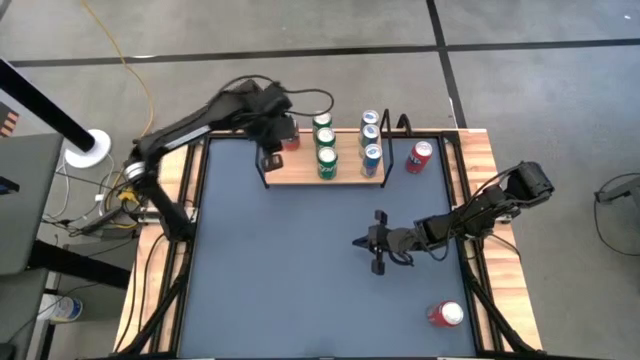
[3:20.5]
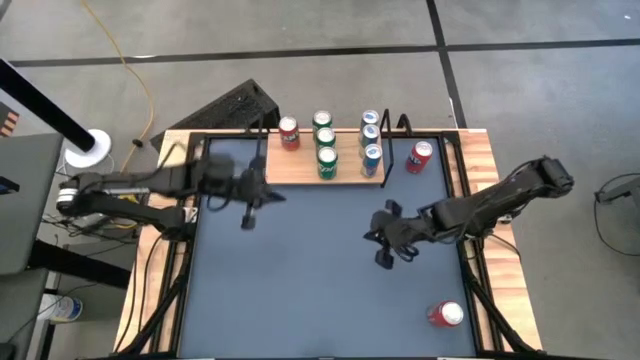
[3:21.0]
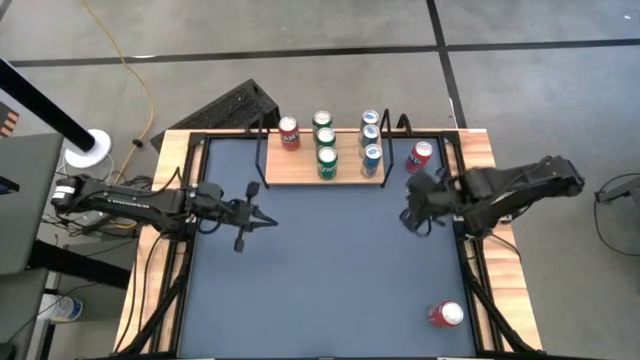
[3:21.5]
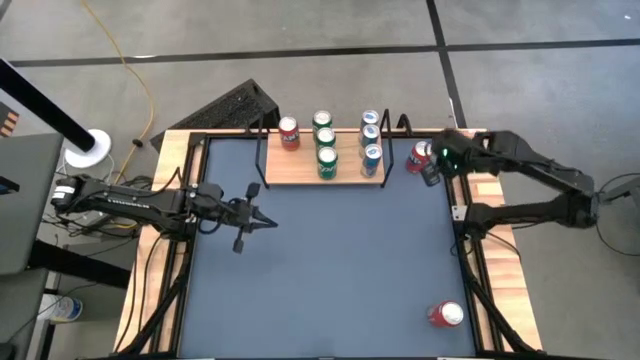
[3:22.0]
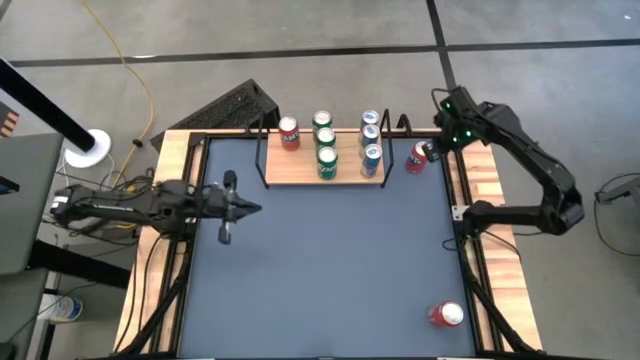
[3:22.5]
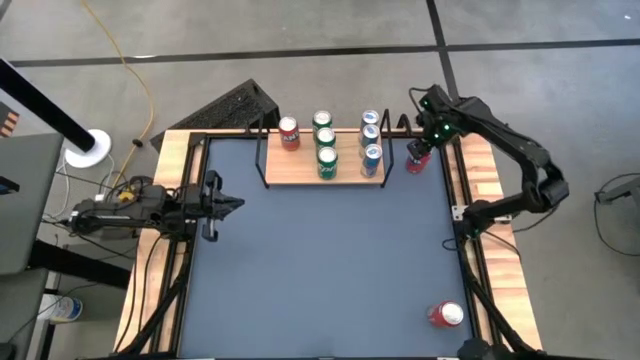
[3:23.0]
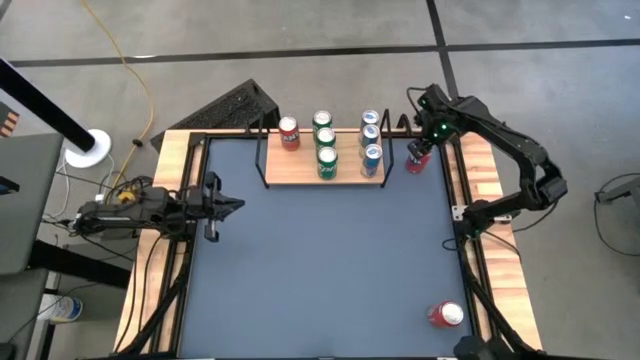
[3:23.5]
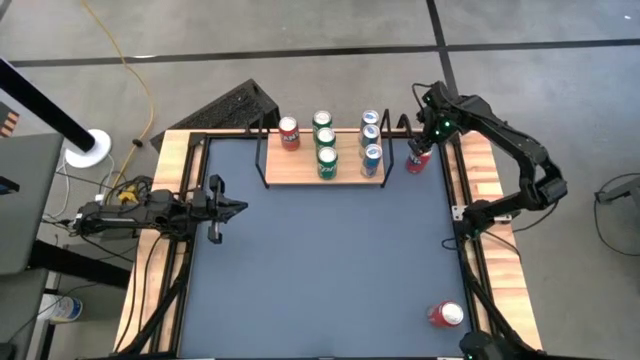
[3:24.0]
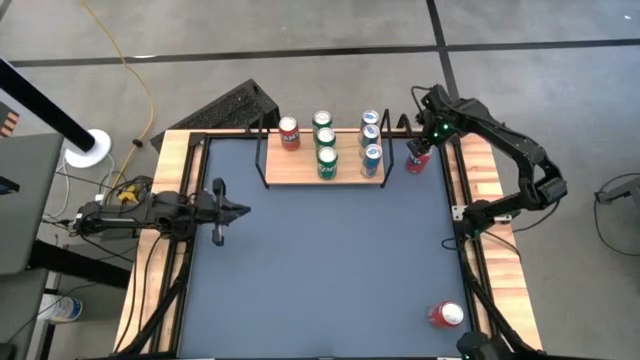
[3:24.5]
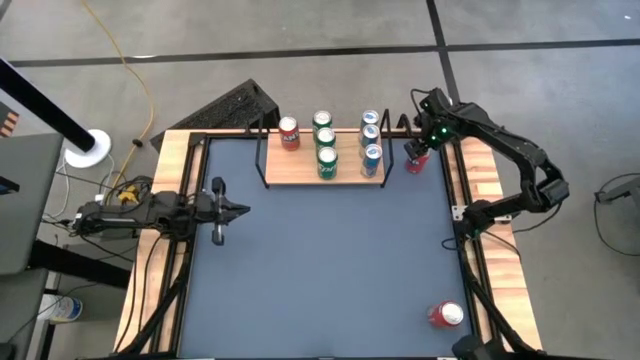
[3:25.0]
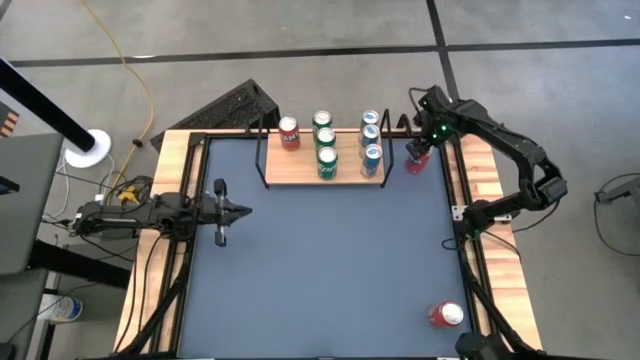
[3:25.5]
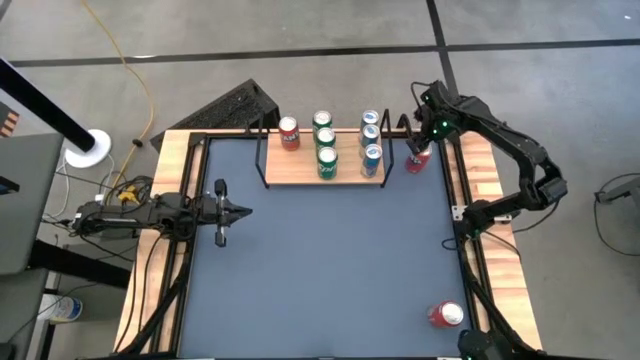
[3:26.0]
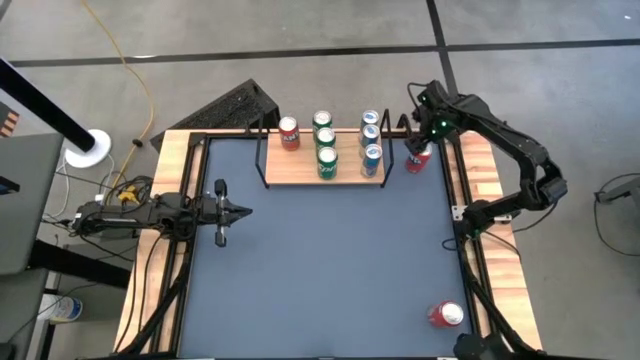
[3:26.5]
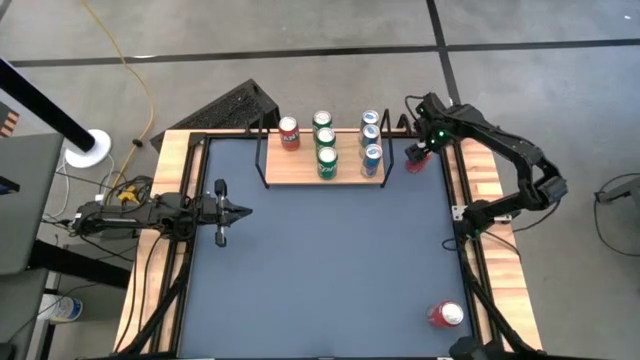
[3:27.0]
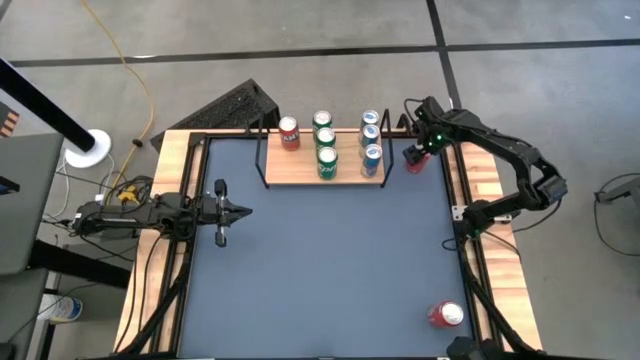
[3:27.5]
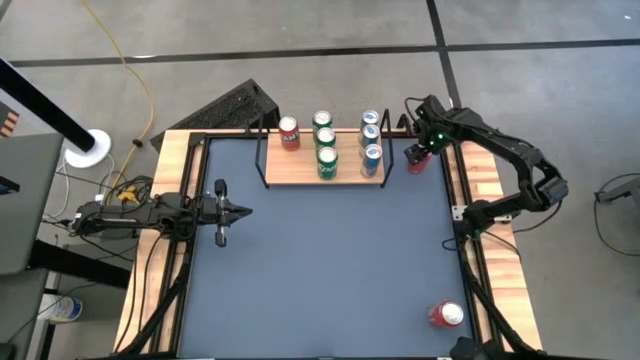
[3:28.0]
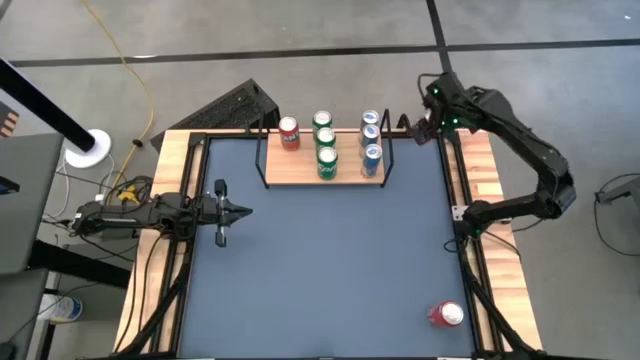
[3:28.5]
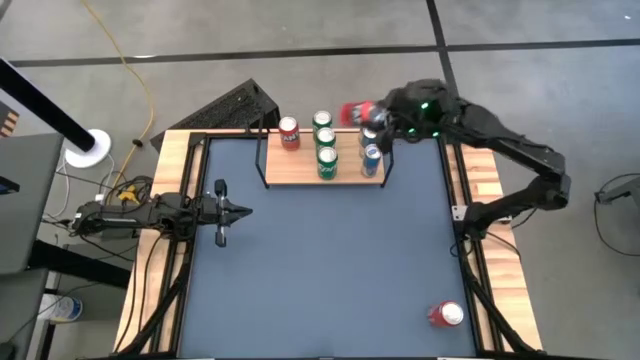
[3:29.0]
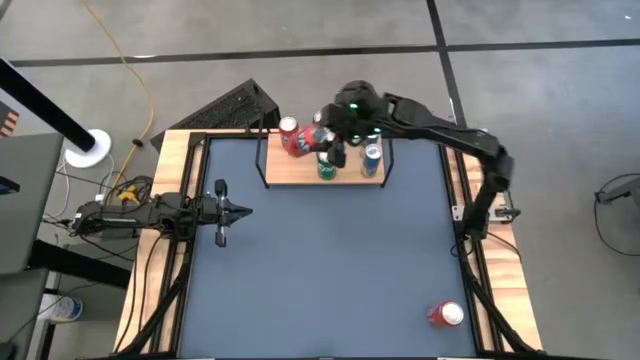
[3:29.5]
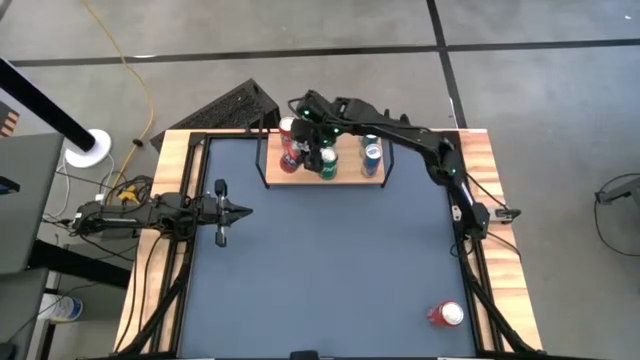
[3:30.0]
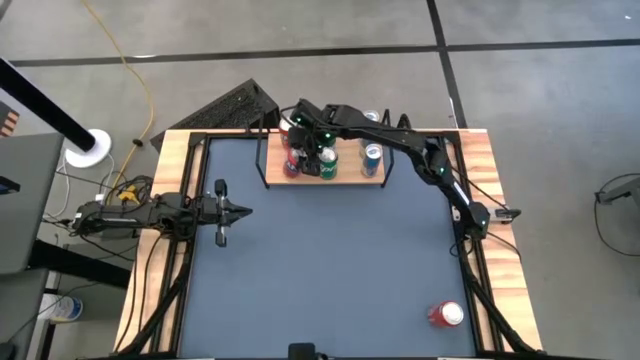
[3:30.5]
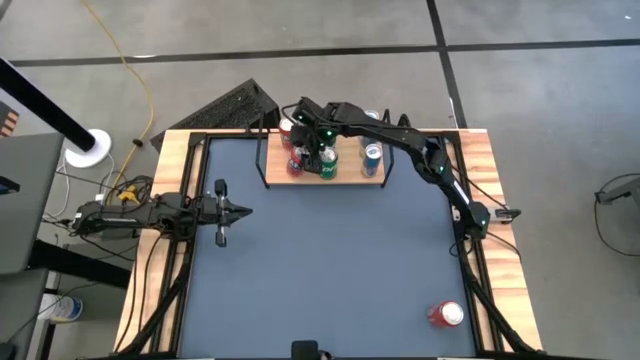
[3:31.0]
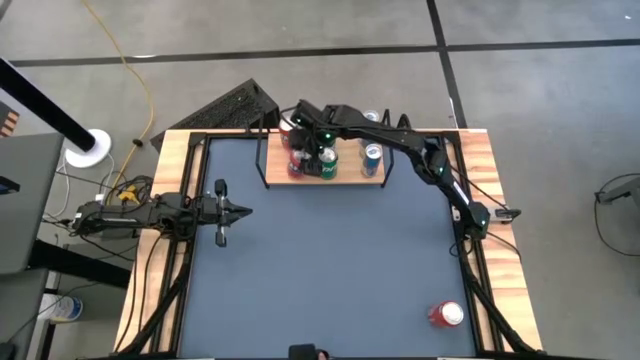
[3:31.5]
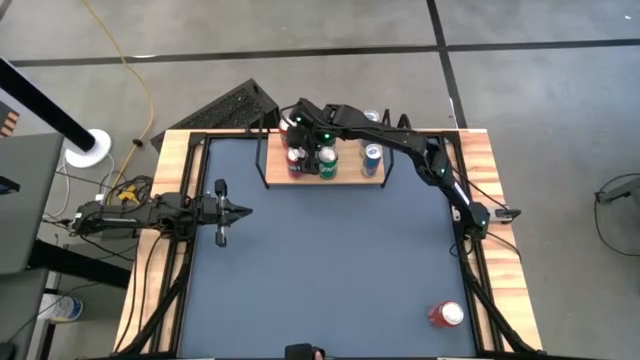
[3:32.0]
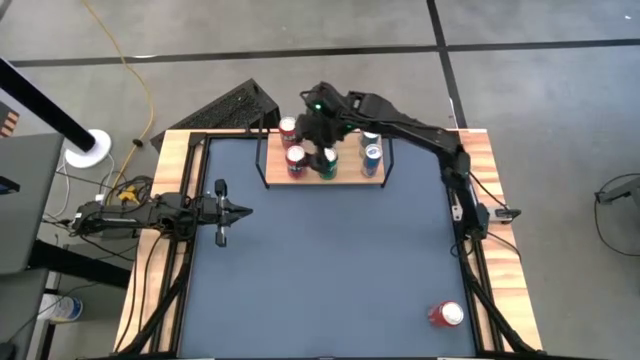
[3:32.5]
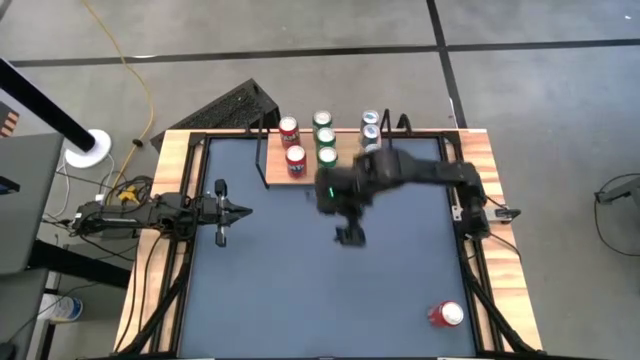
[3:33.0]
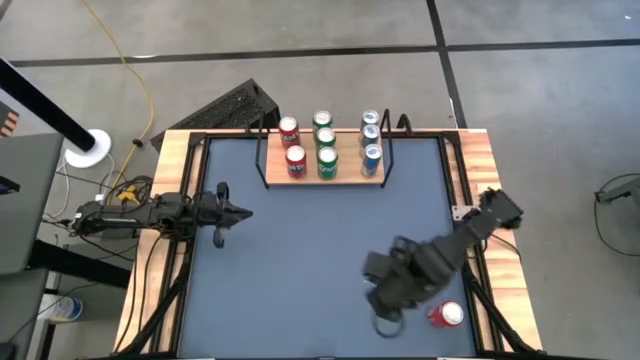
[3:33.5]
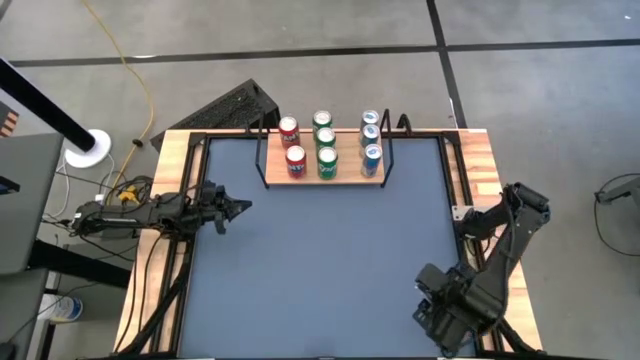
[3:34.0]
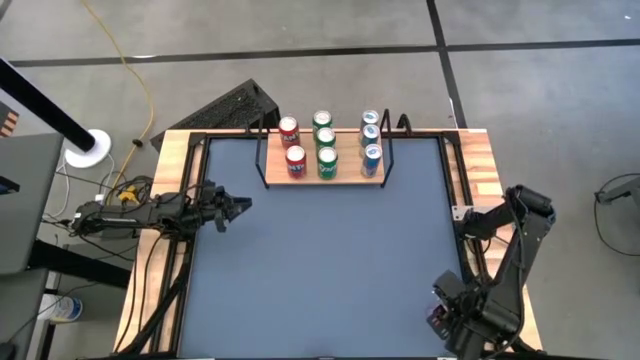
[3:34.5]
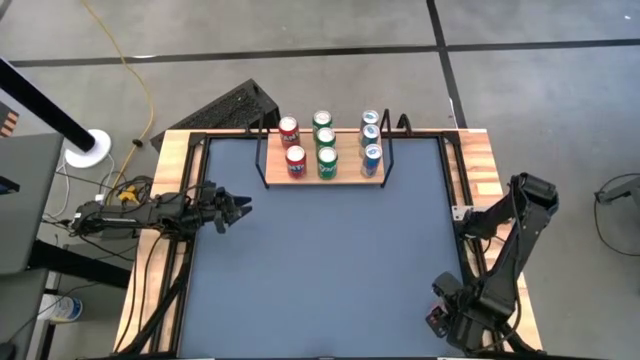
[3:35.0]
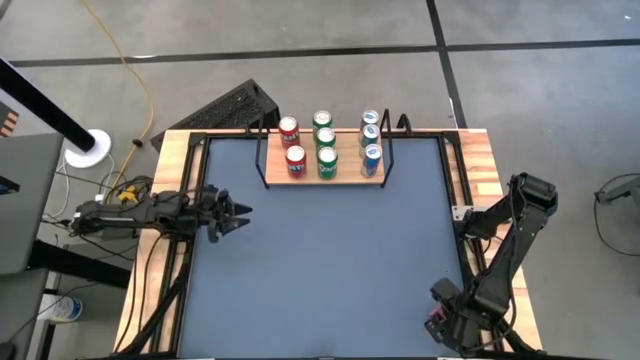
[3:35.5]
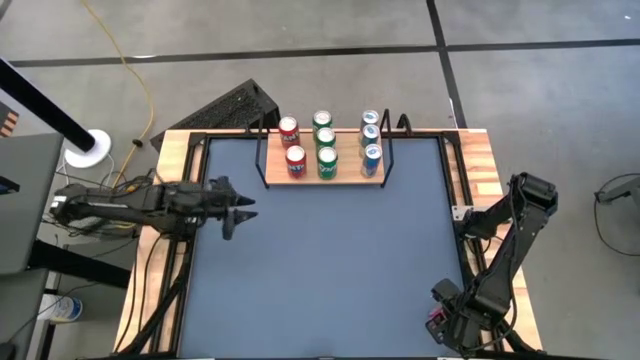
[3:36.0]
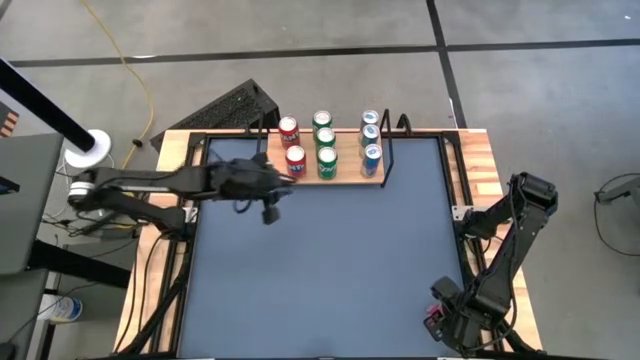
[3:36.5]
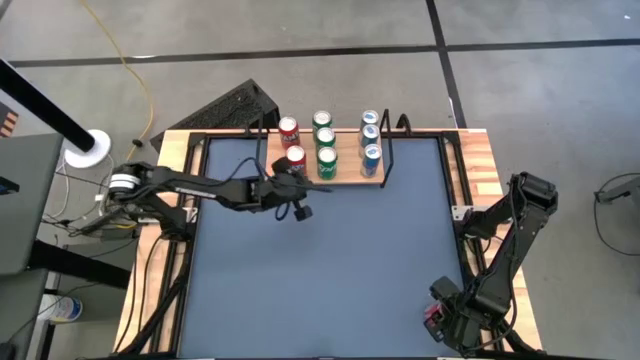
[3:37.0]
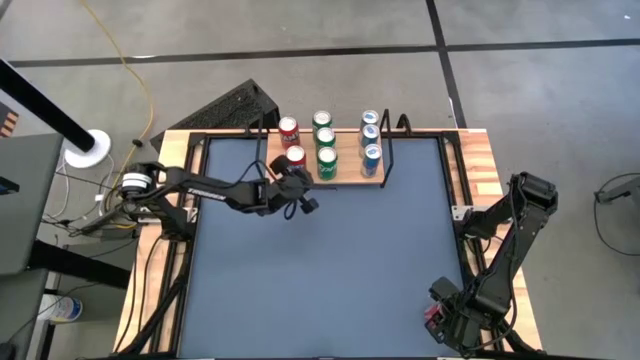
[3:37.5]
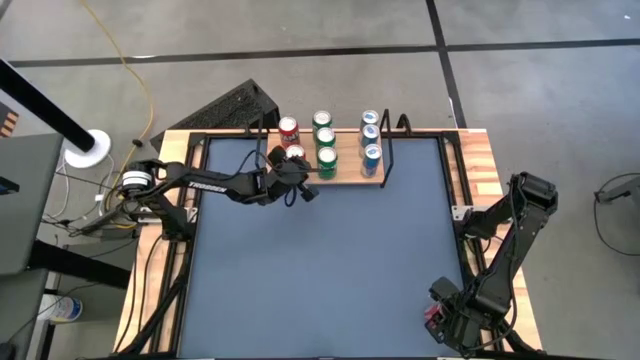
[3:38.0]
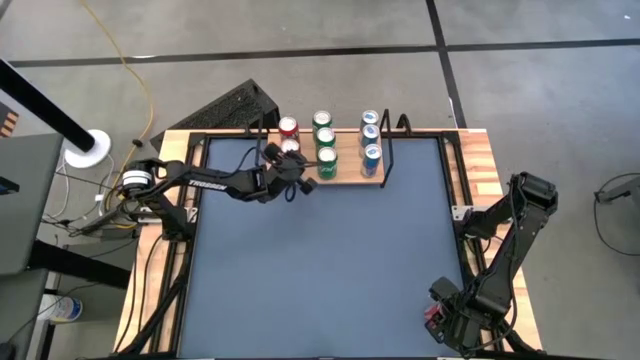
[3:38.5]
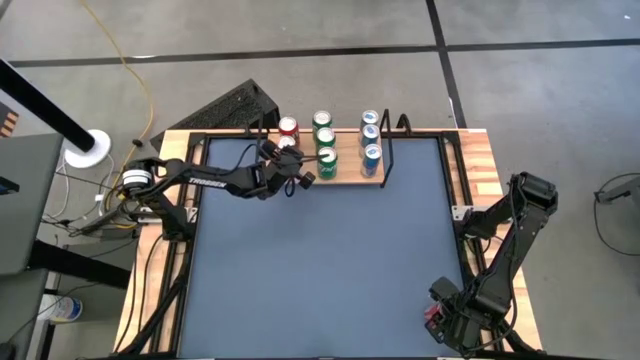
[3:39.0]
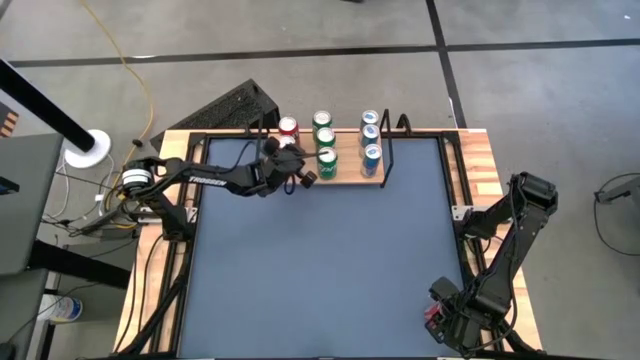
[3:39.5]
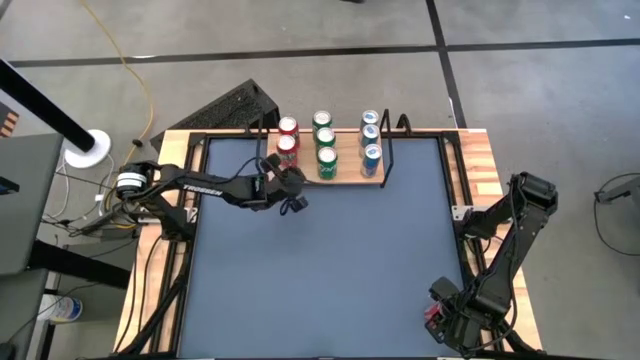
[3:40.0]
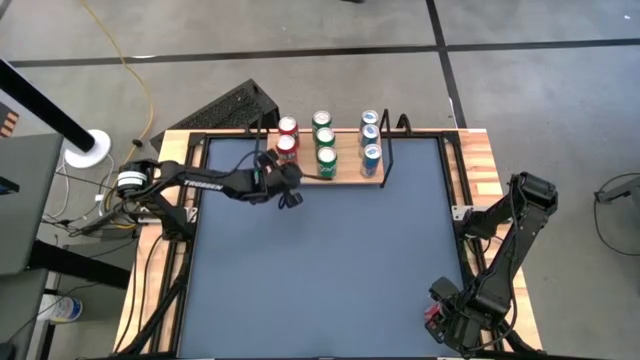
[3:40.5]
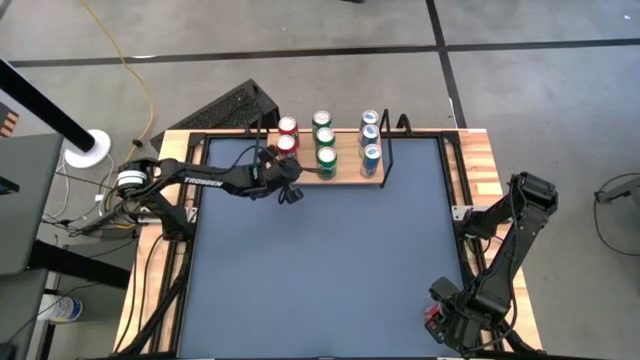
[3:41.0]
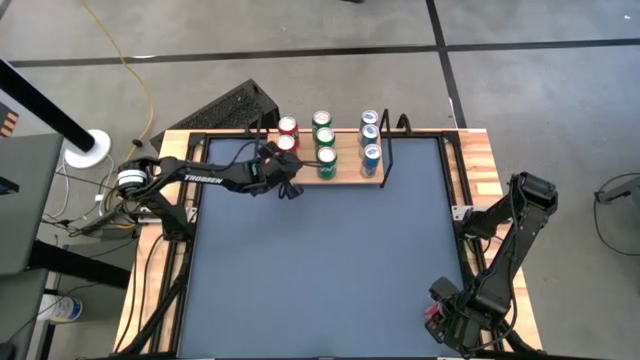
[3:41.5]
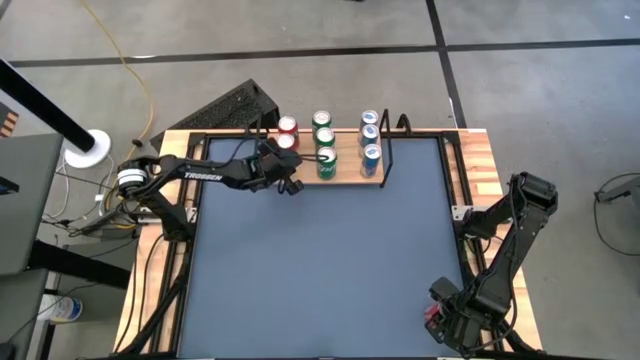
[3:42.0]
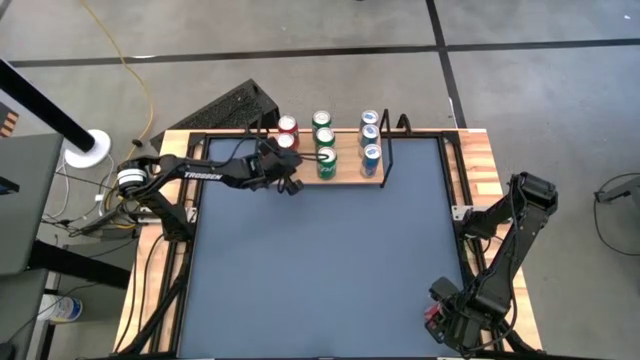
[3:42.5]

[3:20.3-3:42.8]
Task: Place canned beverage on shelf
Put the top red soda can on the shelf aligned with the other red soda can
